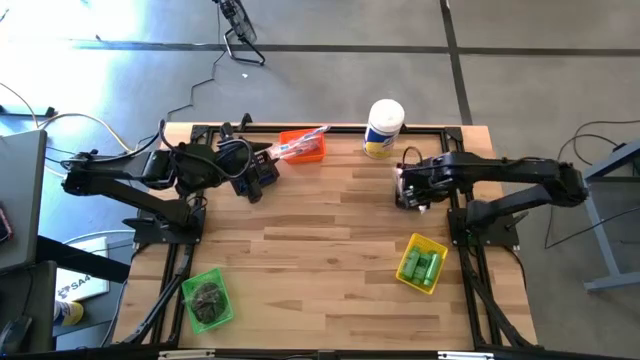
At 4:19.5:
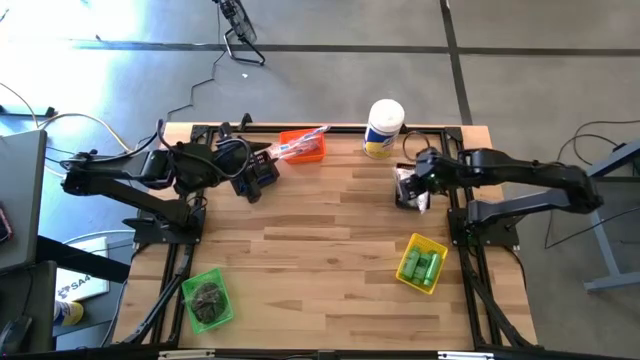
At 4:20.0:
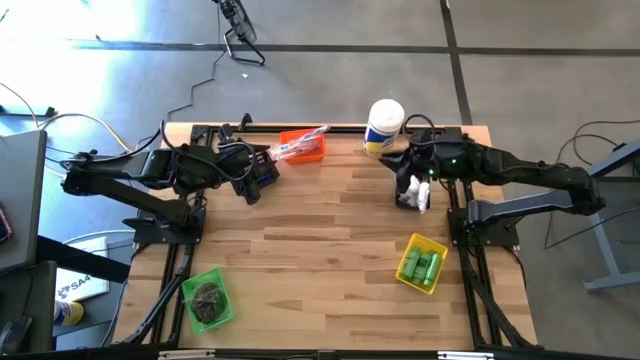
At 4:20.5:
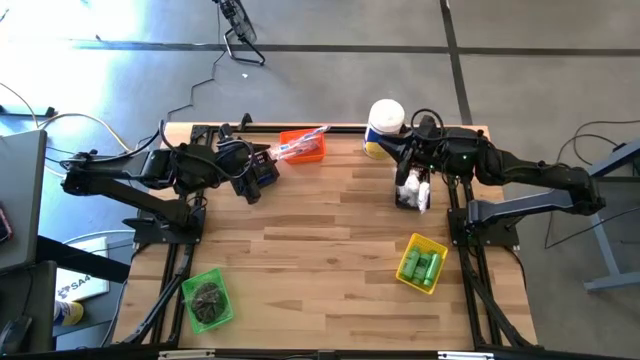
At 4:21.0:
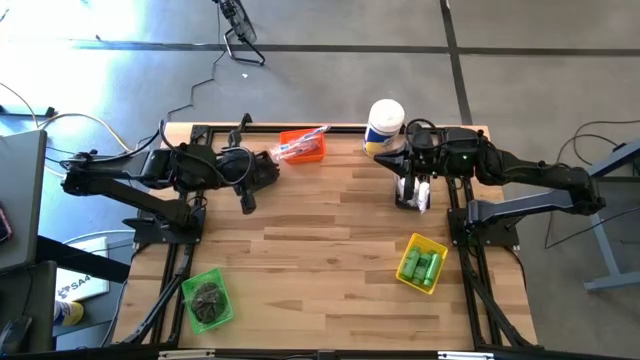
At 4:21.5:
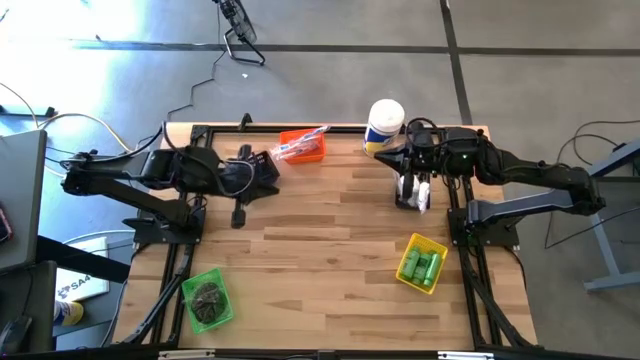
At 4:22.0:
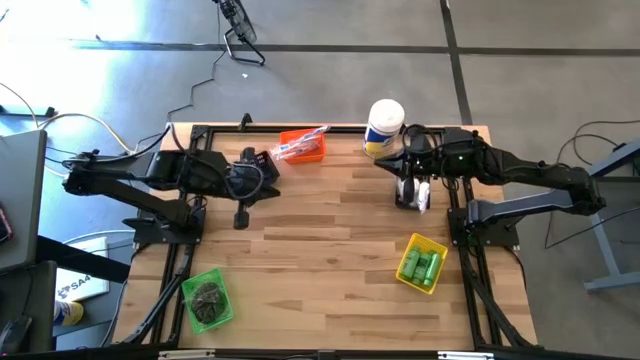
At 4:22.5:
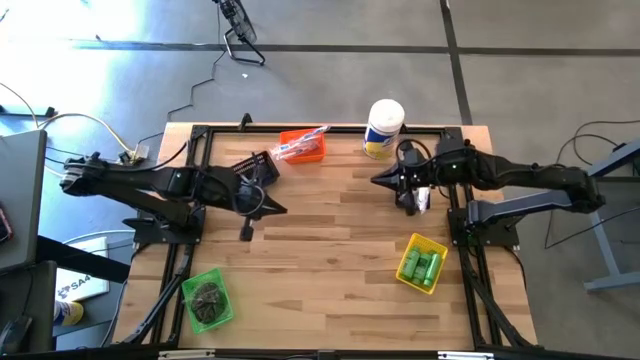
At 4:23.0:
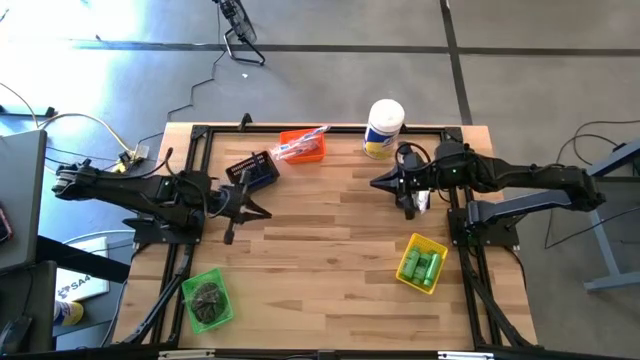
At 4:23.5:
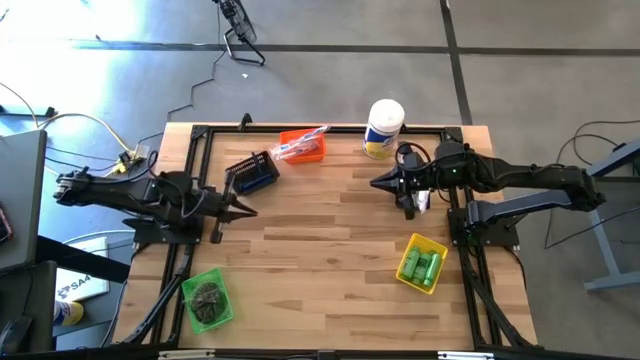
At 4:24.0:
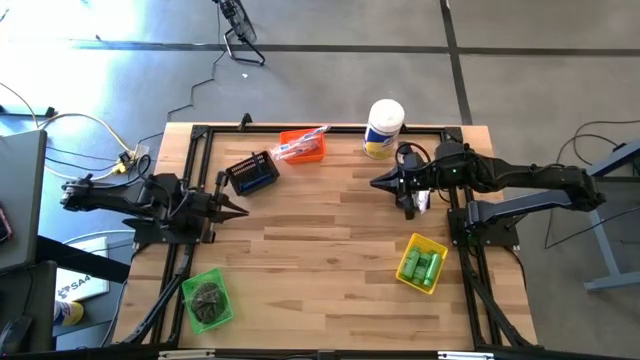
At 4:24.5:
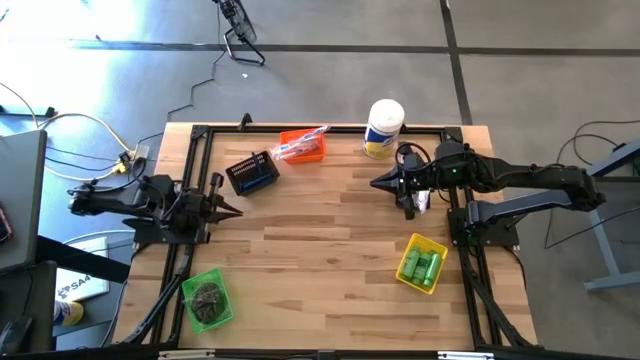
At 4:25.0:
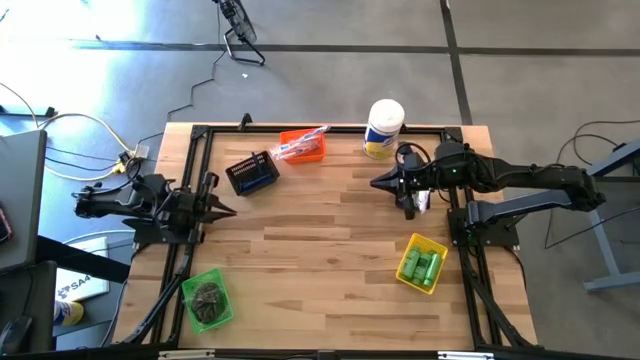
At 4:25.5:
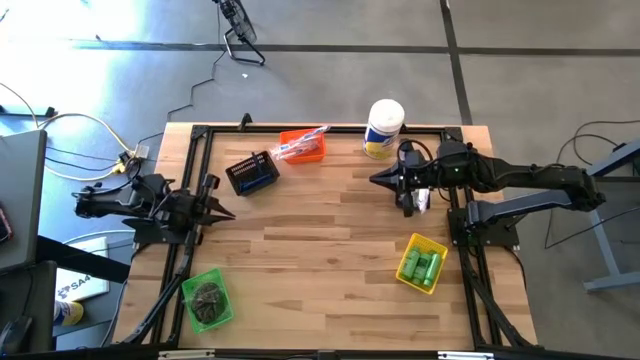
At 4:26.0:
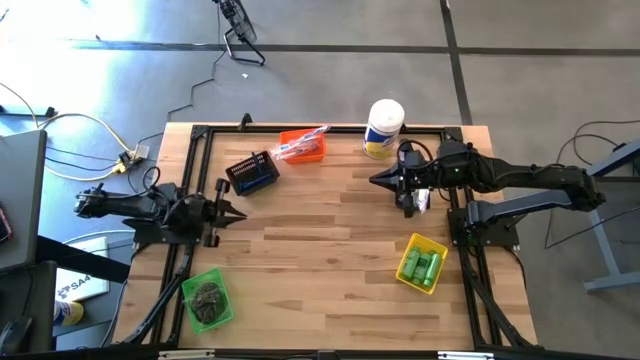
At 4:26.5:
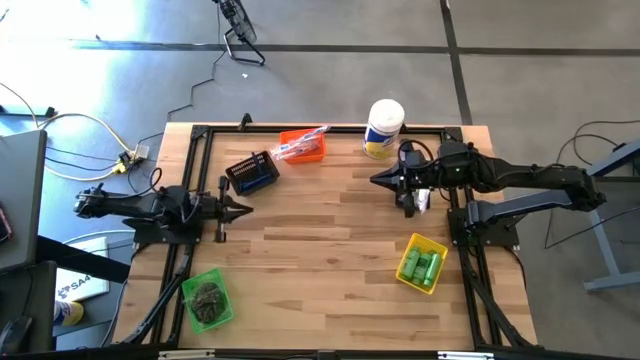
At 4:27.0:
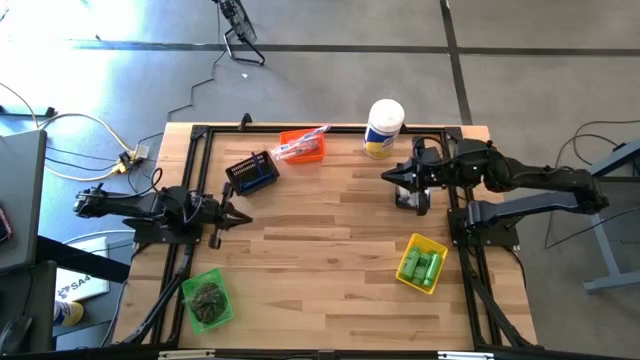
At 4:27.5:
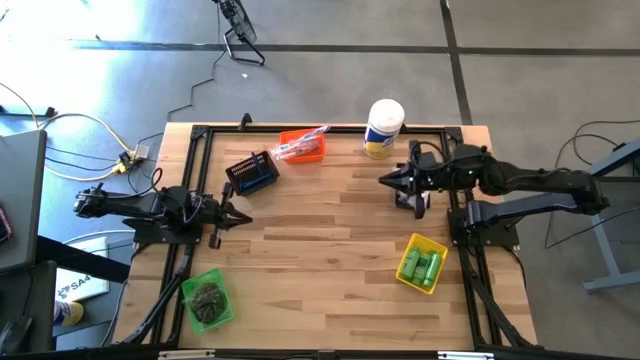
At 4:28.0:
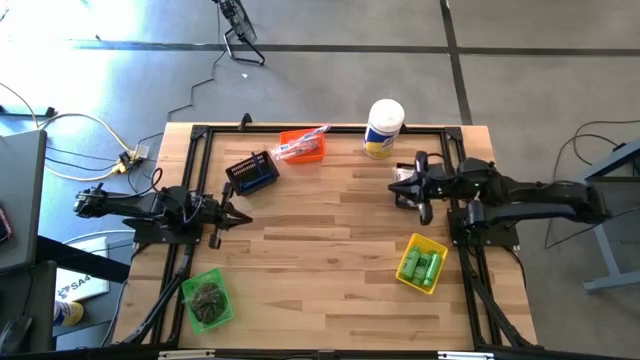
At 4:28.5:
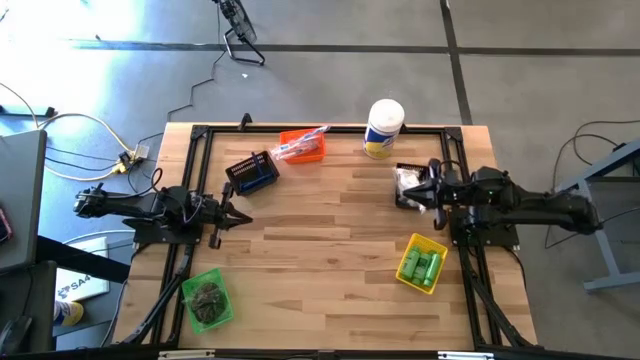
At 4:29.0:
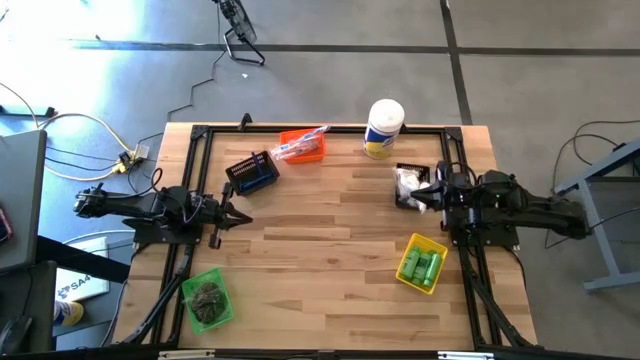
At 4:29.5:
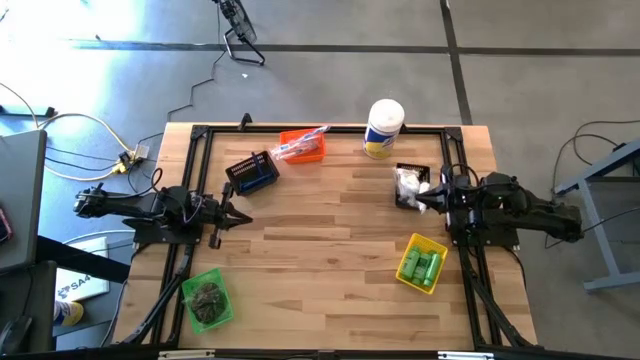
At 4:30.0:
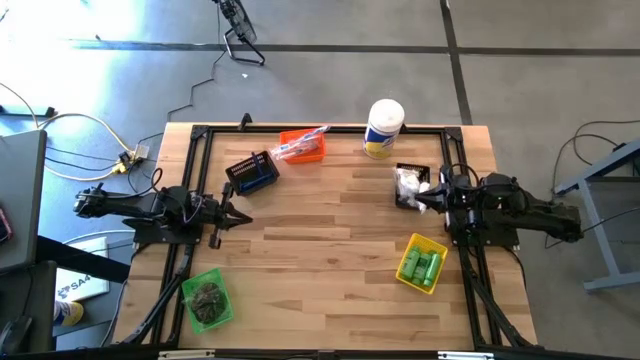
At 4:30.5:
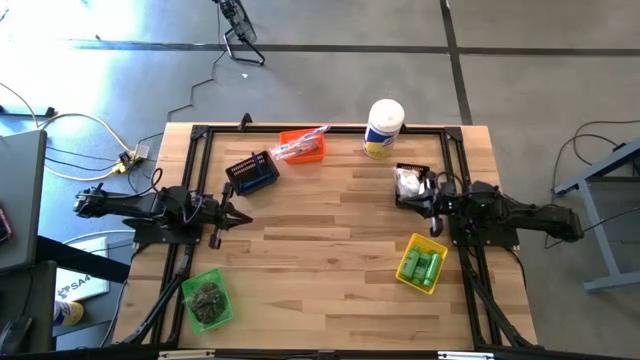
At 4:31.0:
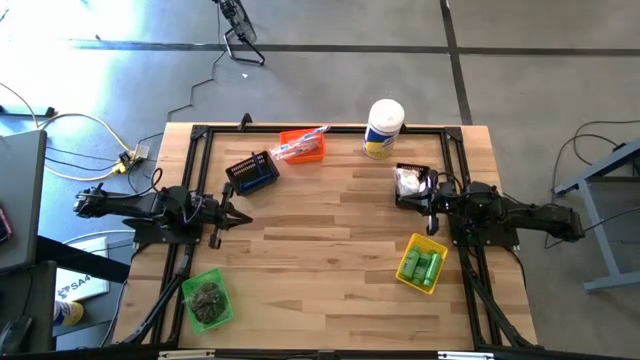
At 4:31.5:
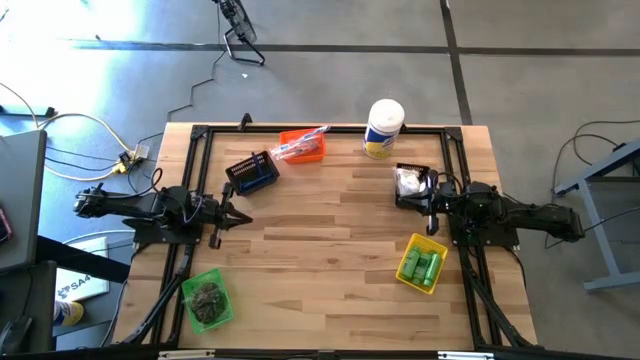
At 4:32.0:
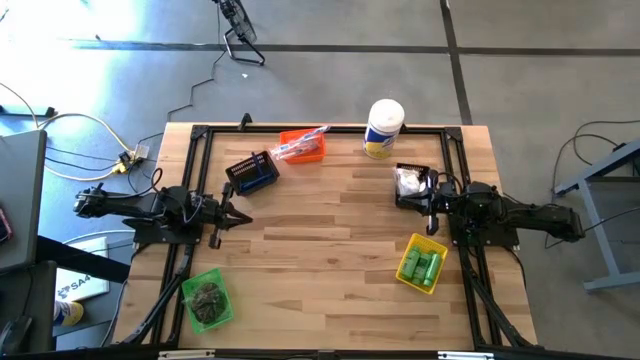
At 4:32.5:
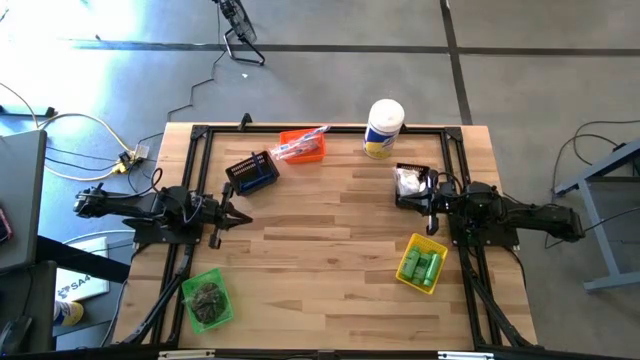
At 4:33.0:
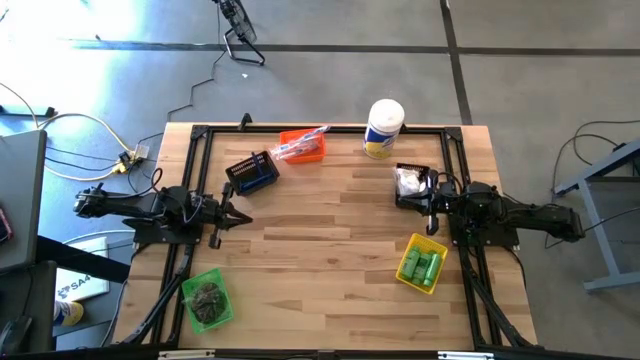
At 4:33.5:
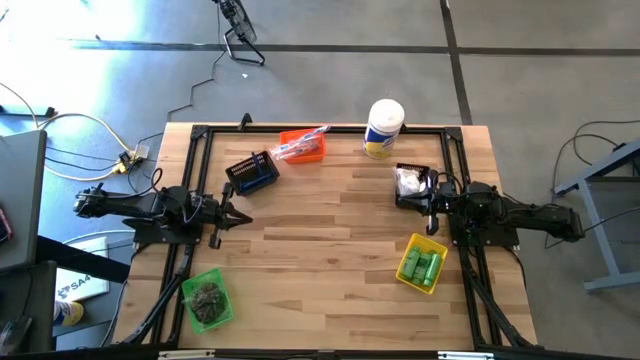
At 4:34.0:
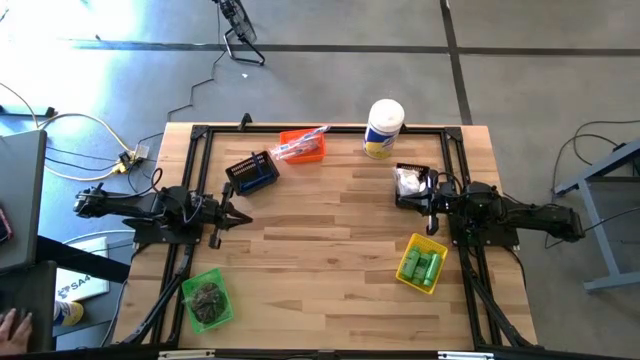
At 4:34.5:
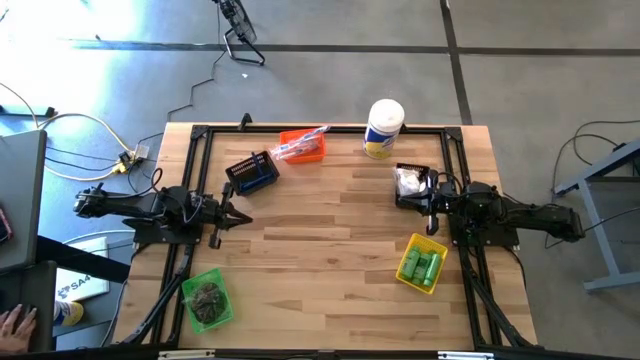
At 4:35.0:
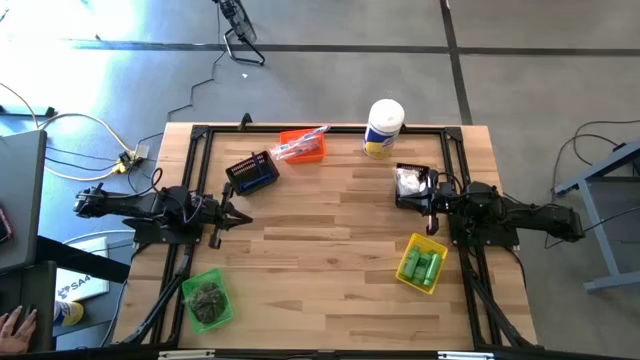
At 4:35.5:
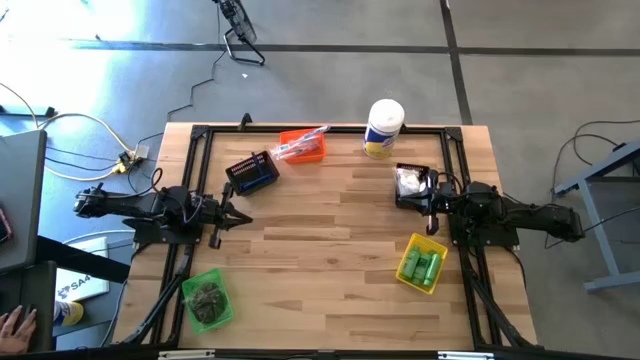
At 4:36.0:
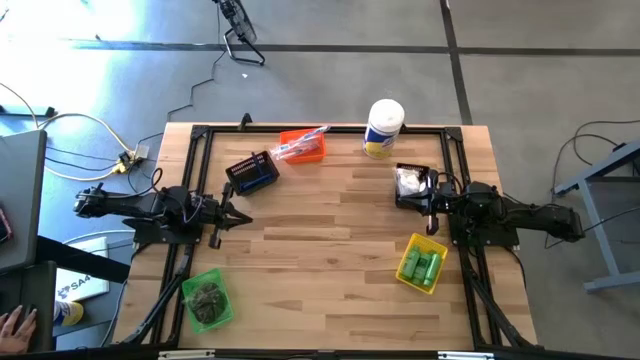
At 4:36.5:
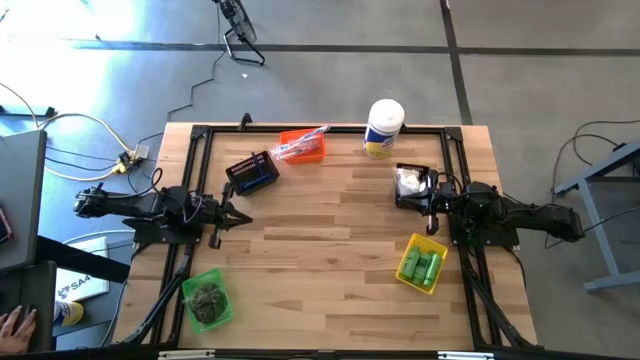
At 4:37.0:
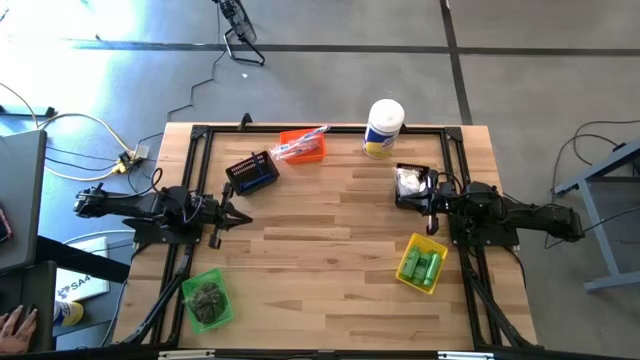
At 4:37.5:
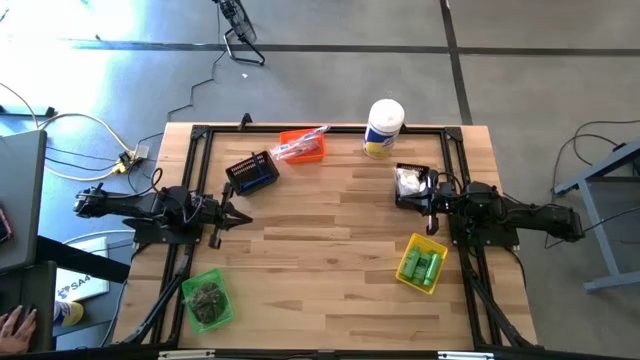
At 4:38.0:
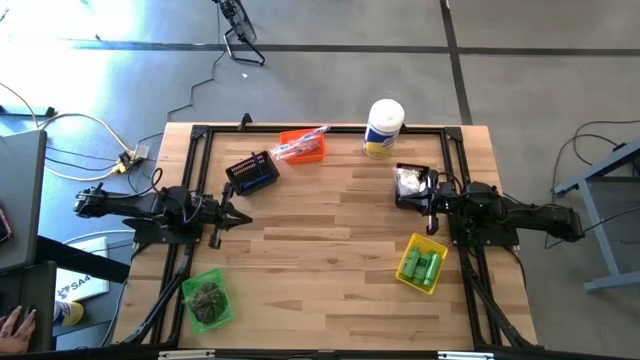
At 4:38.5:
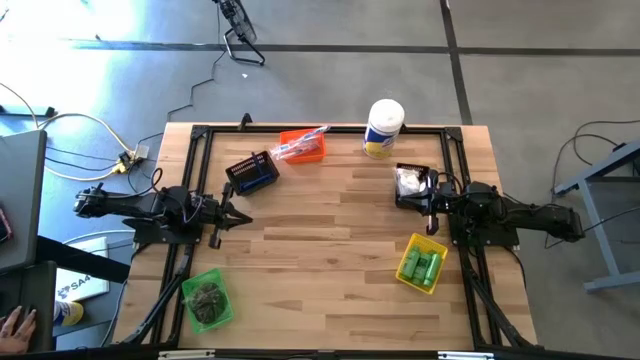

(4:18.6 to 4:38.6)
Task: Pick & Place Travel size toiletries
Return to Home Position

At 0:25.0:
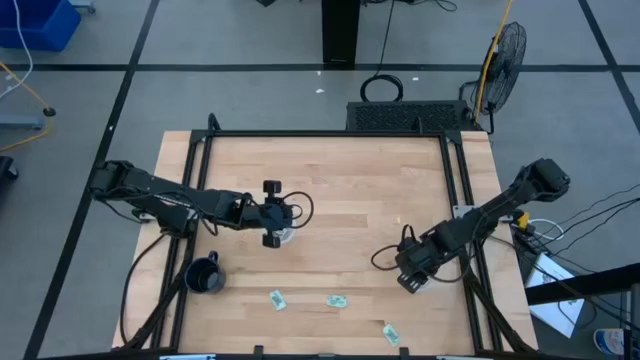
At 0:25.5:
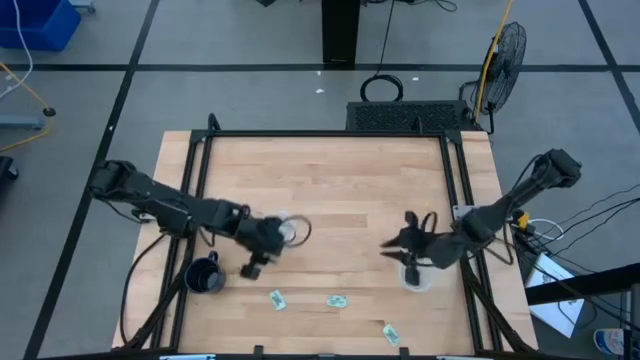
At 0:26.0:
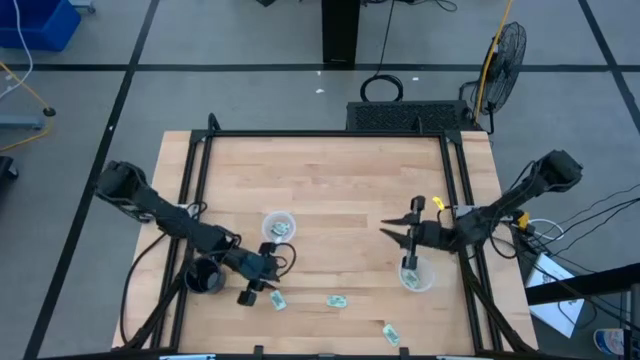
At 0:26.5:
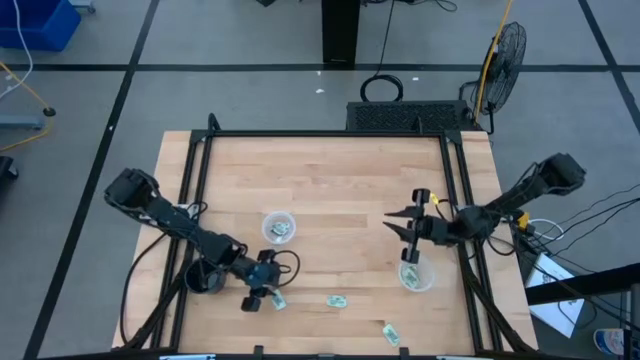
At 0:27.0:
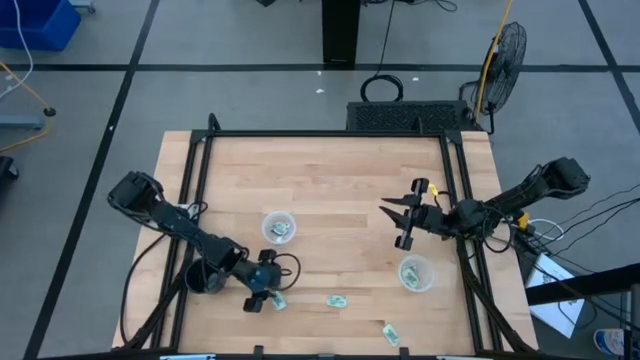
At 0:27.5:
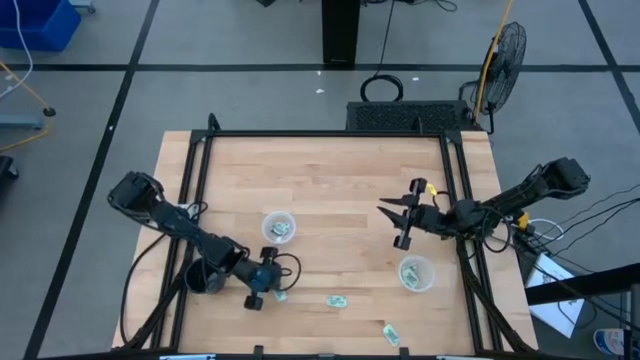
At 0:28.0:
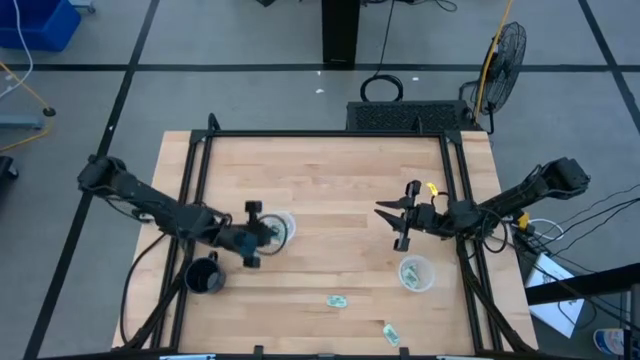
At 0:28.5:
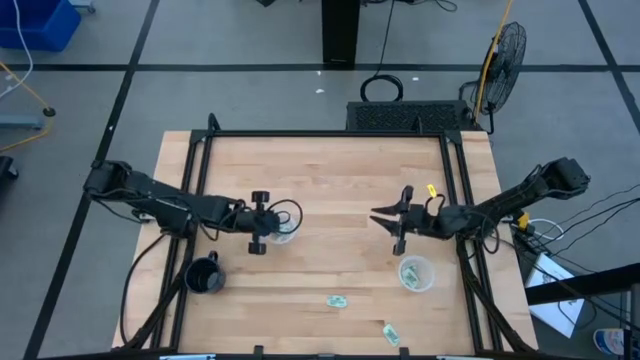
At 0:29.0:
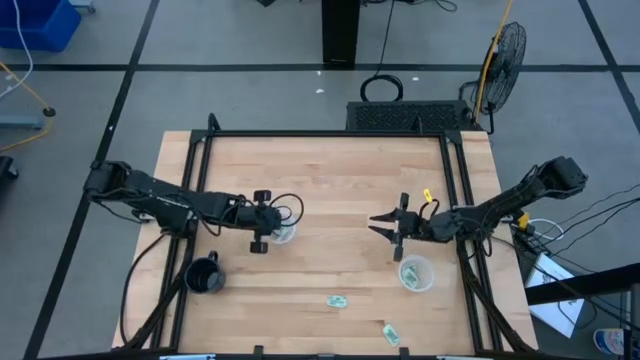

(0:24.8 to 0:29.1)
Task: Pick and place Stevia / Truvia into bins
Put the green stevia packet into the left transparent container
